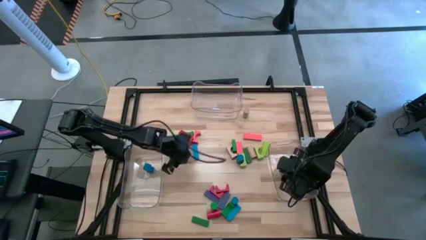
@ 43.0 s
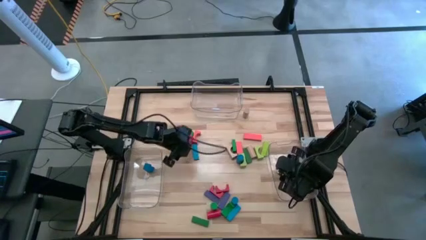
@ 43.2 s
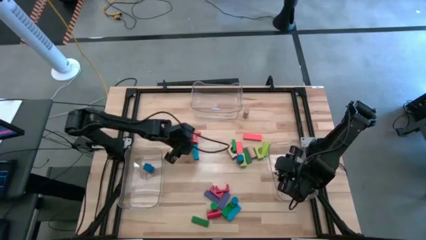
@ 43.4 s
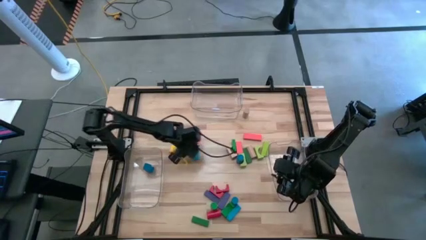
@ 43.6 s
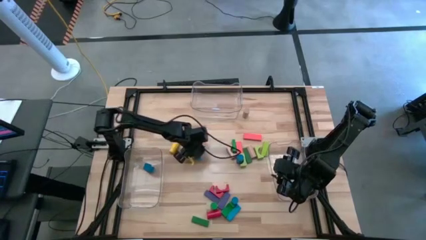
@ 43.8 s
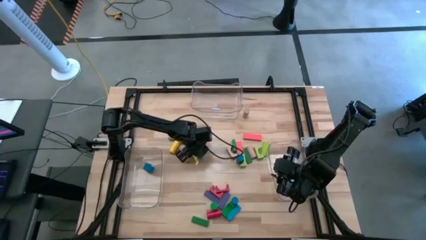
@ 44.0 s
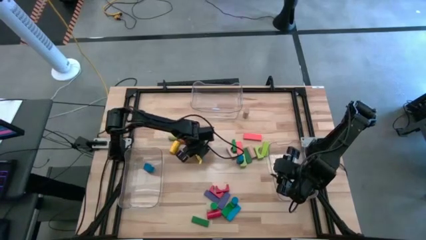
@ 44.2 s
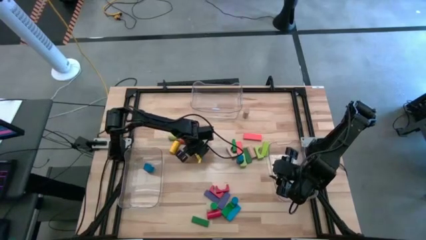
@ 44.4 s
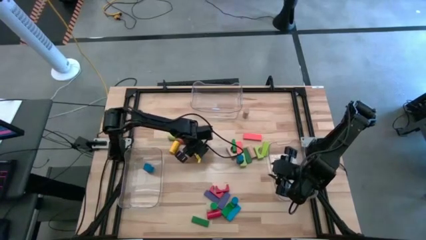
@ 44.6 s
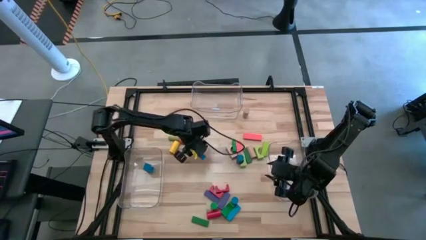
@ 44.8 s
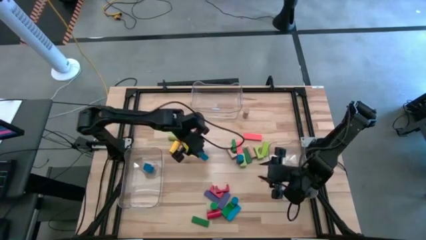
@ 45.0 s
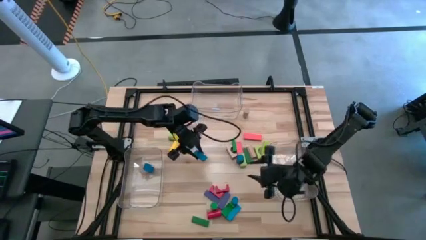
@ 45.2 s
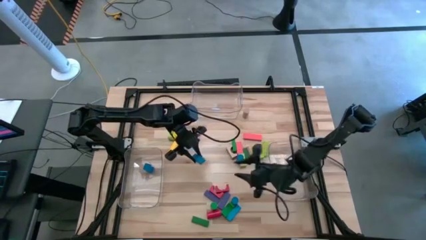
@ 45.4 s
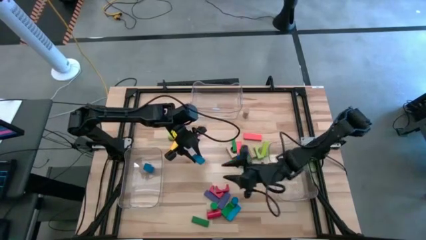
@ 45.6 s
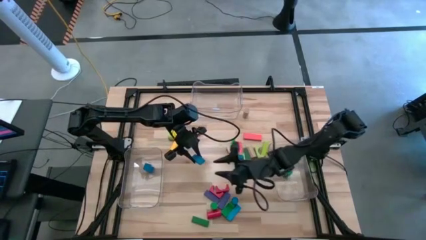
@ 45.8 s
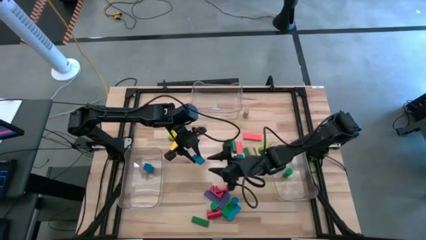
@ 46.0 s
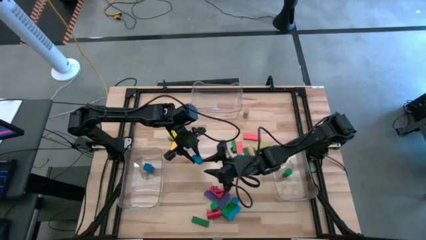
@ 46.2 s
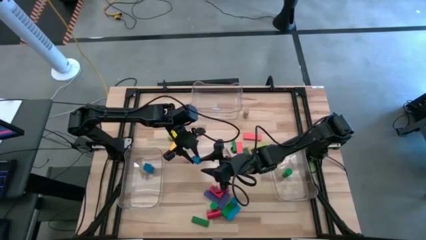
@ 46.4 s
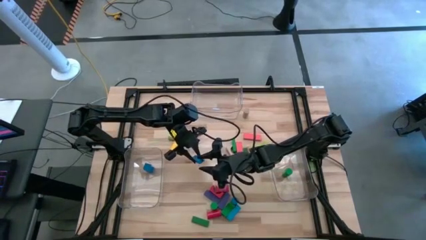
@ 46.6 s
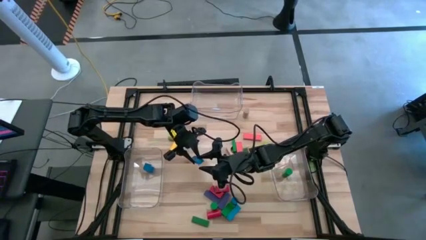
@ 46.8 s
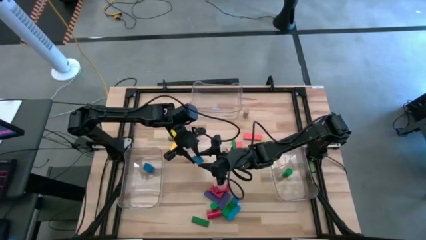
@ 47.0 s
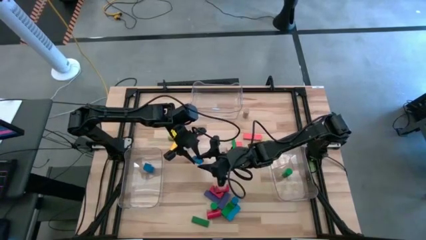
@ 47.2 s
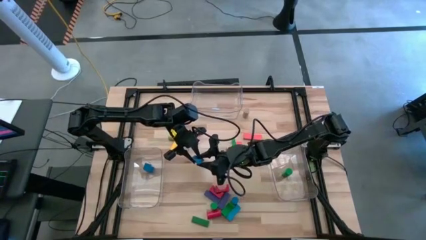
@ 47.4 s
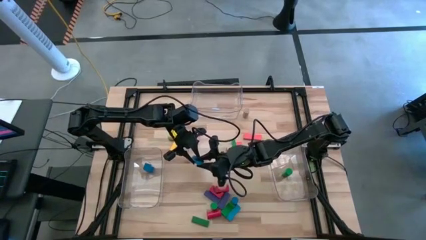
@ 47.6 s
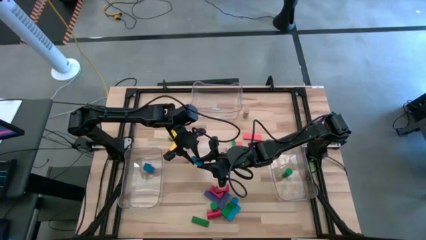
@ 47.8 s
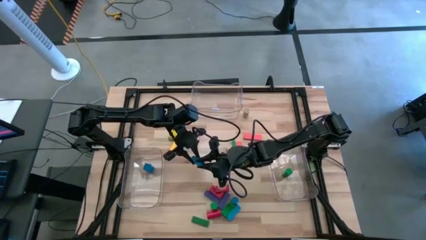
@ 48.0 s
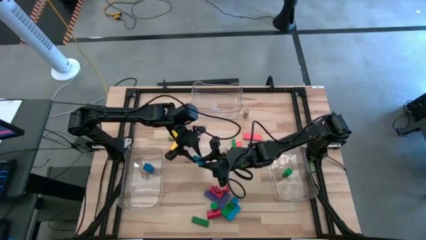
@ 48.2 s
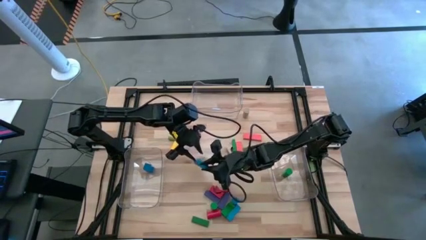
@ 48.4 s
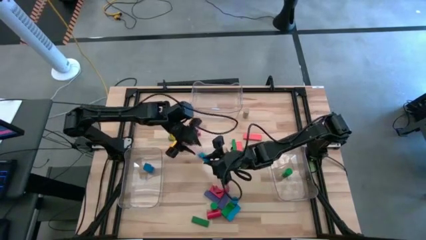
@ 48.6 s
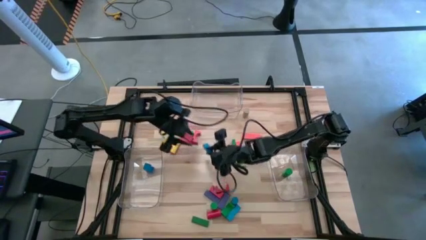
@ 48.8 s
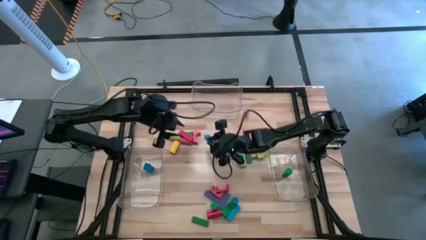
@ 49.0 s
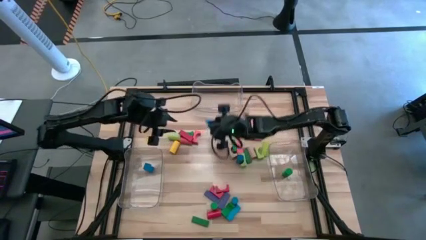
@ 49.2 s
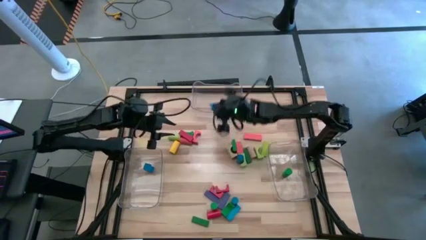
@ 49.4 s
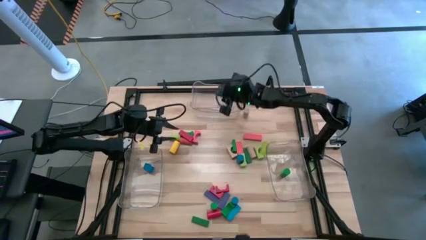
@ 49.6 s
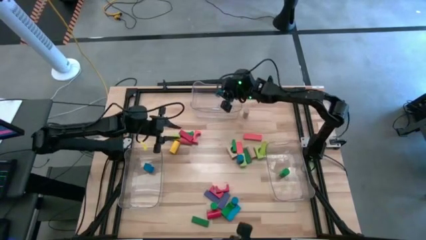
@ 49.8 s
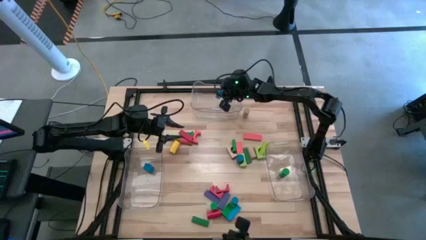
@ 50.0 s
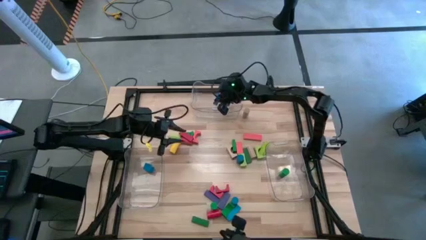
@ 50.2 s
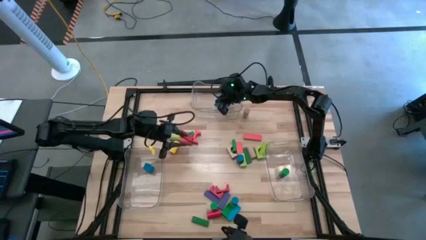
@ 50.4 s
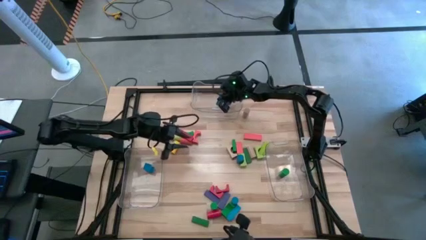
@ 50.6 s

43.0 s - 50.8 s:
Task: Sort blocks by size
Put the light blue rectangular block into the top transparent bin
